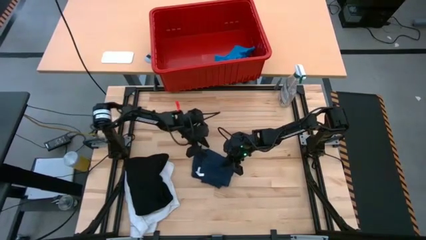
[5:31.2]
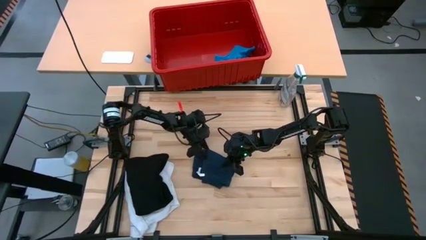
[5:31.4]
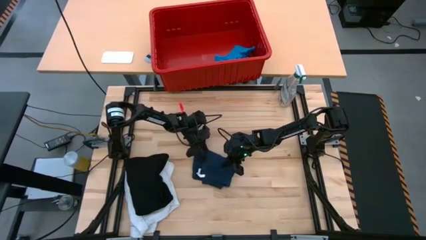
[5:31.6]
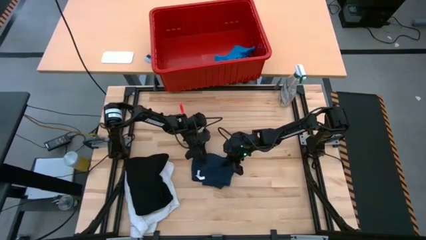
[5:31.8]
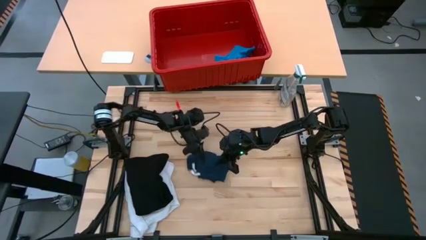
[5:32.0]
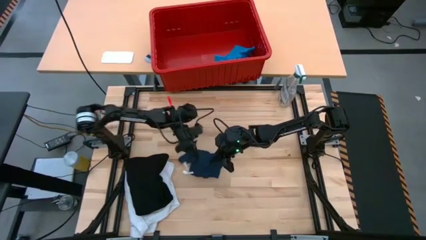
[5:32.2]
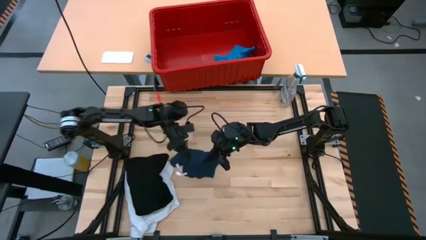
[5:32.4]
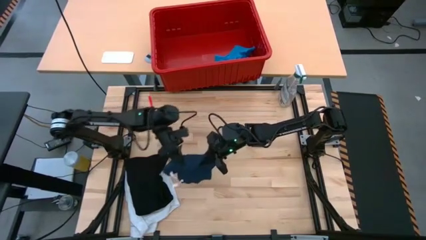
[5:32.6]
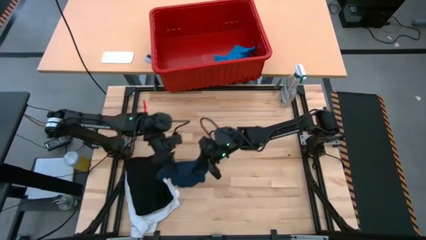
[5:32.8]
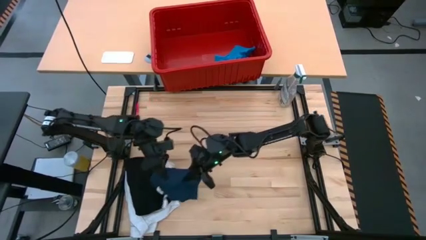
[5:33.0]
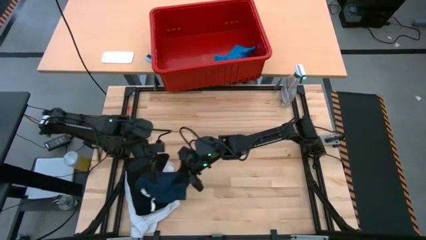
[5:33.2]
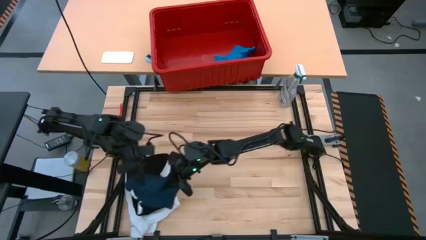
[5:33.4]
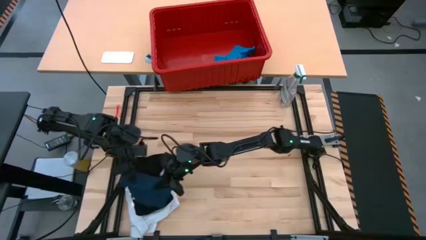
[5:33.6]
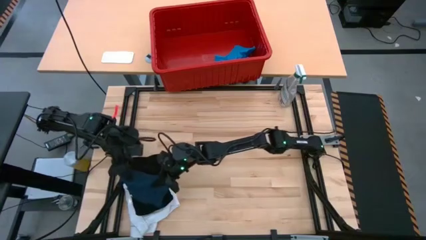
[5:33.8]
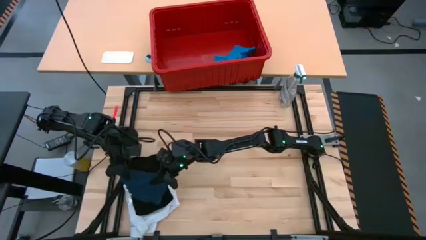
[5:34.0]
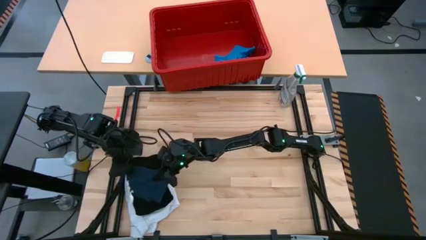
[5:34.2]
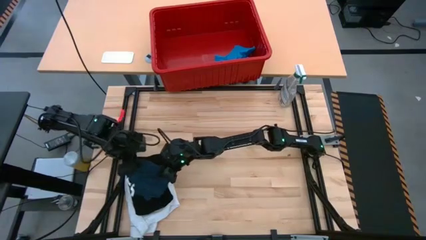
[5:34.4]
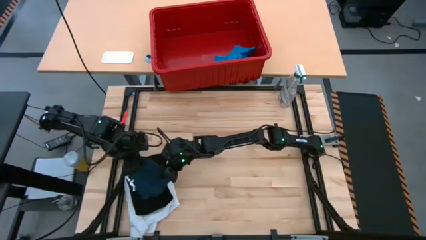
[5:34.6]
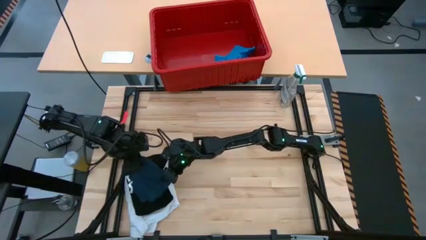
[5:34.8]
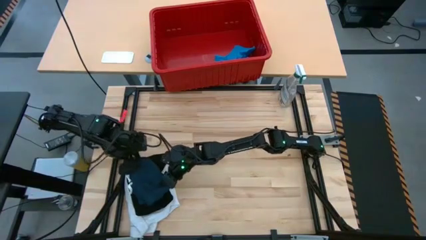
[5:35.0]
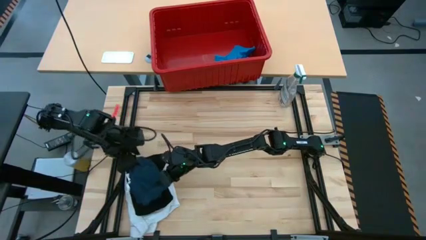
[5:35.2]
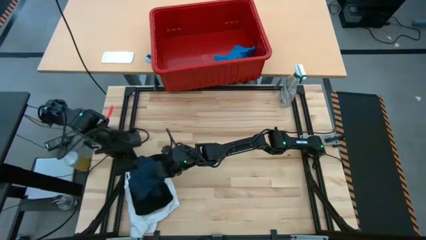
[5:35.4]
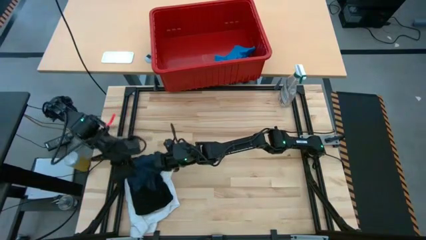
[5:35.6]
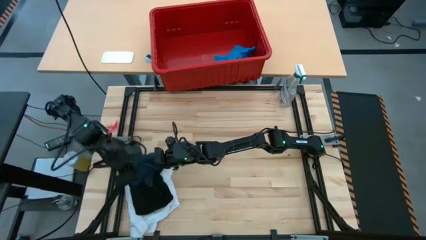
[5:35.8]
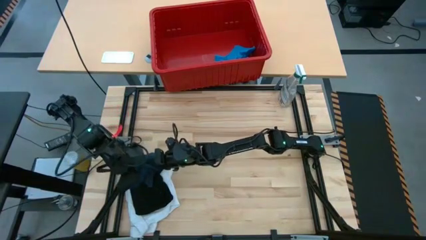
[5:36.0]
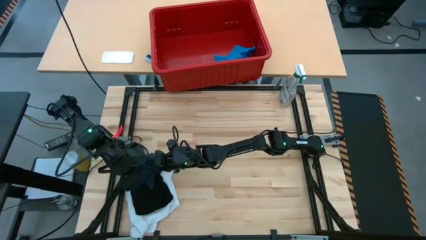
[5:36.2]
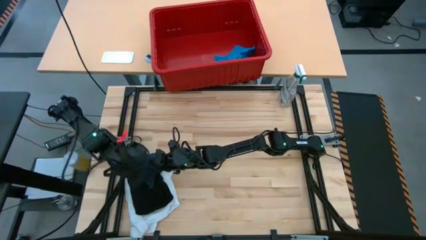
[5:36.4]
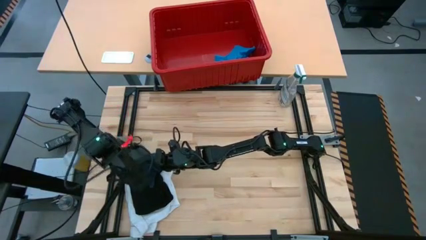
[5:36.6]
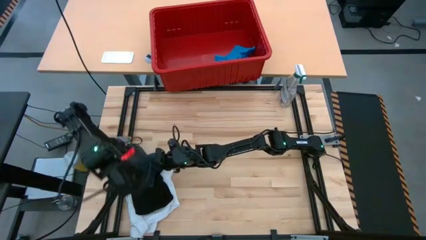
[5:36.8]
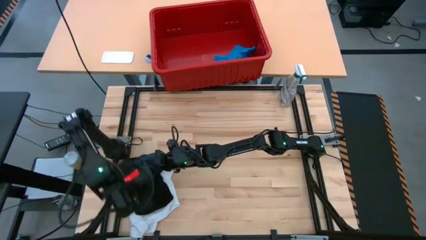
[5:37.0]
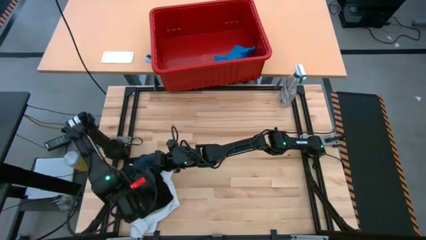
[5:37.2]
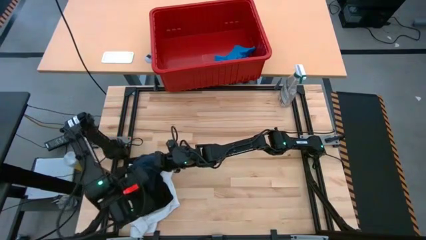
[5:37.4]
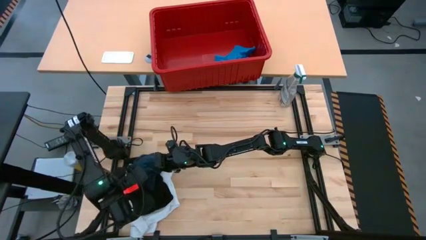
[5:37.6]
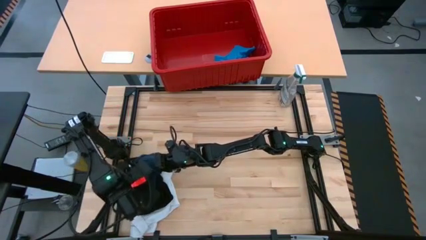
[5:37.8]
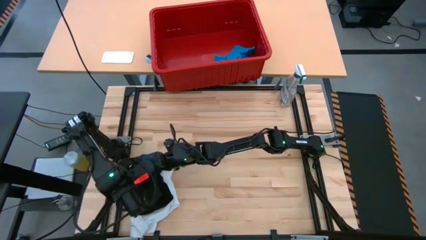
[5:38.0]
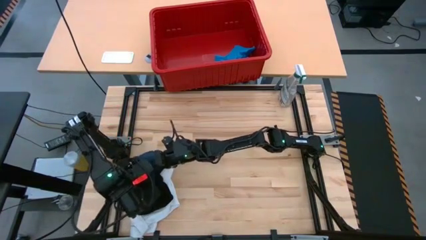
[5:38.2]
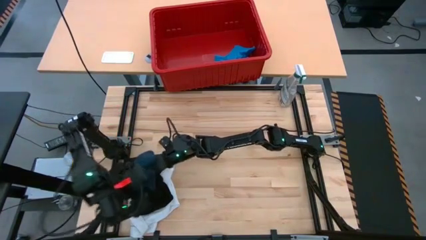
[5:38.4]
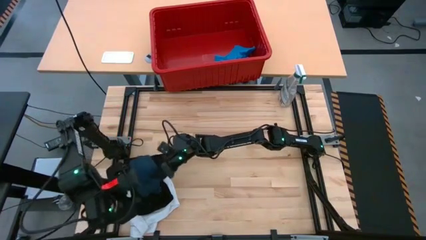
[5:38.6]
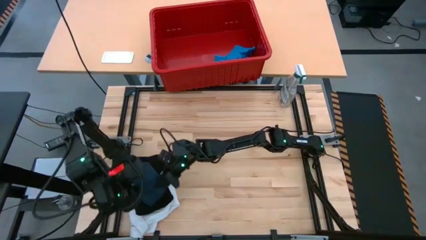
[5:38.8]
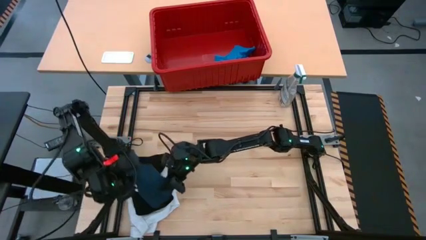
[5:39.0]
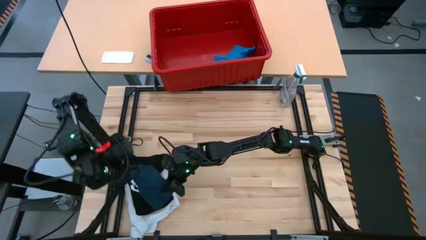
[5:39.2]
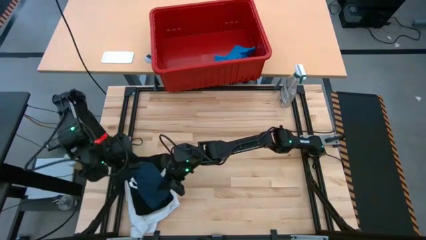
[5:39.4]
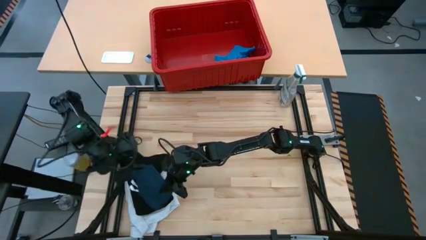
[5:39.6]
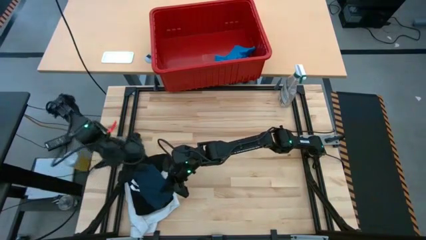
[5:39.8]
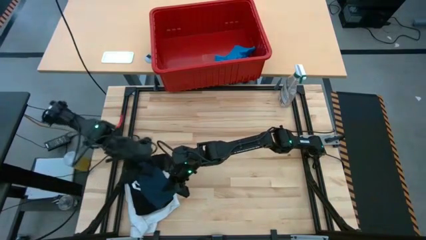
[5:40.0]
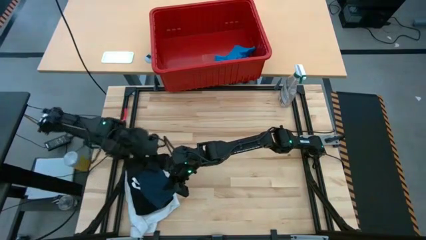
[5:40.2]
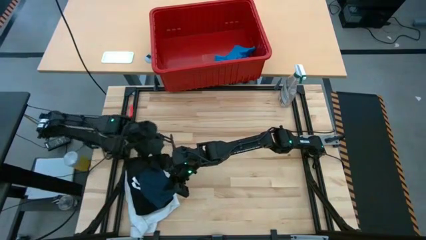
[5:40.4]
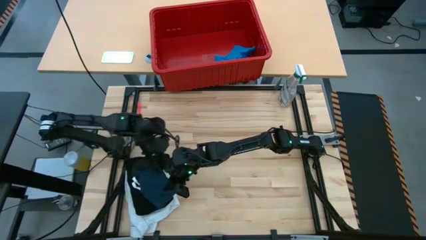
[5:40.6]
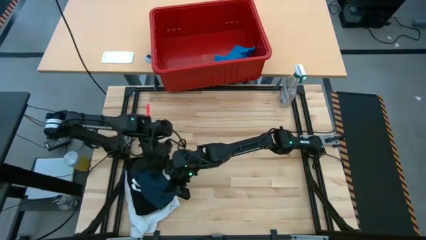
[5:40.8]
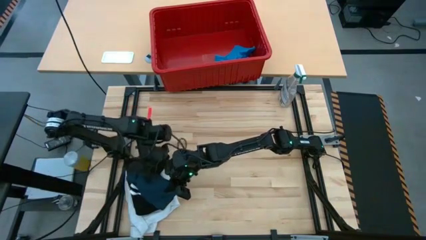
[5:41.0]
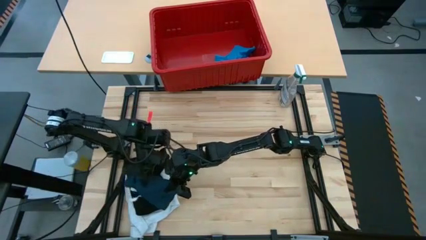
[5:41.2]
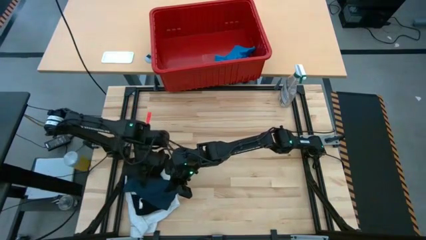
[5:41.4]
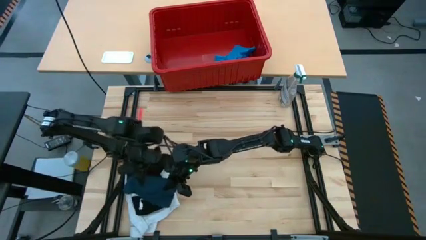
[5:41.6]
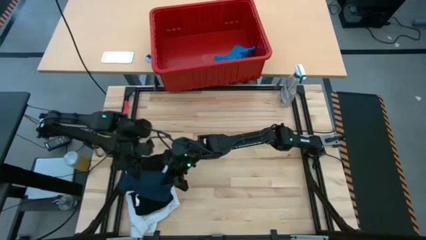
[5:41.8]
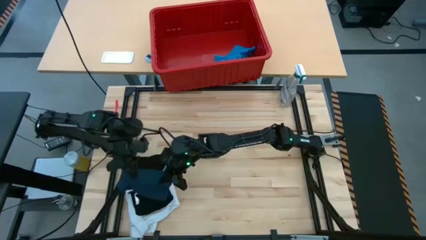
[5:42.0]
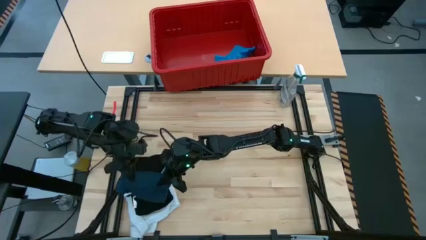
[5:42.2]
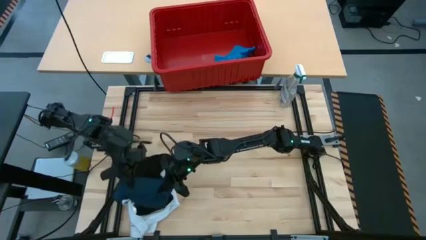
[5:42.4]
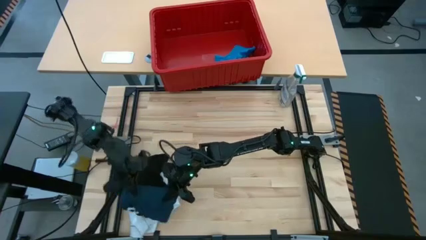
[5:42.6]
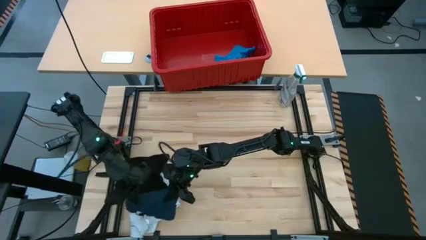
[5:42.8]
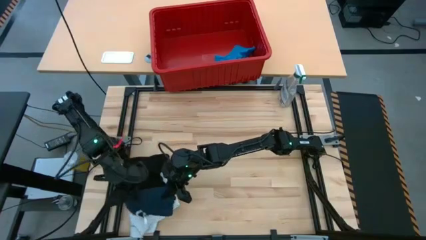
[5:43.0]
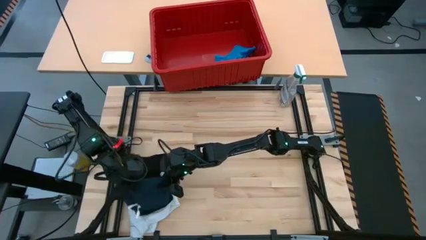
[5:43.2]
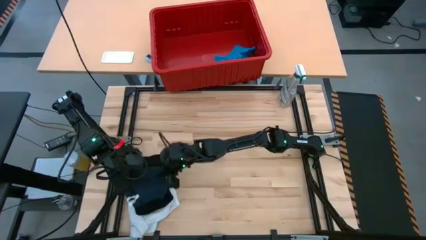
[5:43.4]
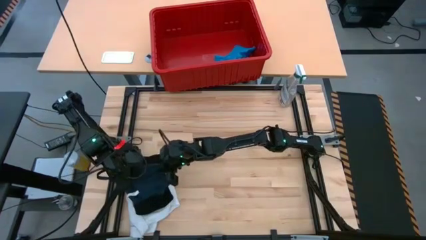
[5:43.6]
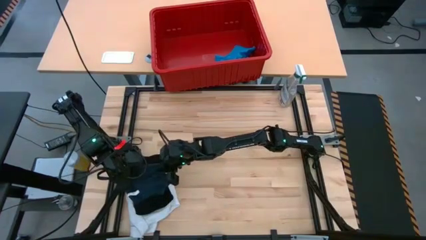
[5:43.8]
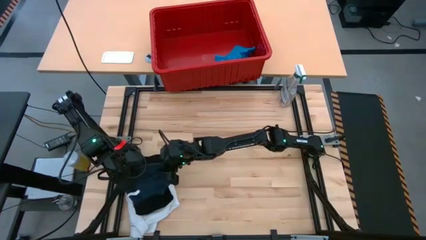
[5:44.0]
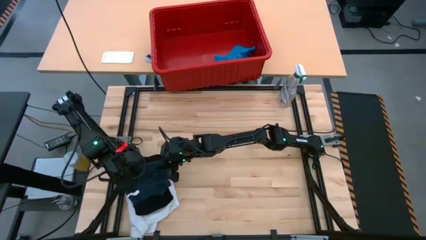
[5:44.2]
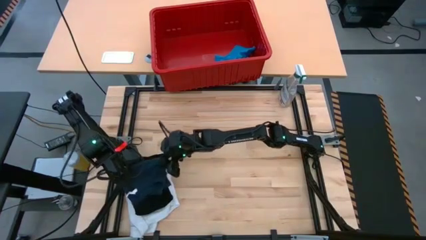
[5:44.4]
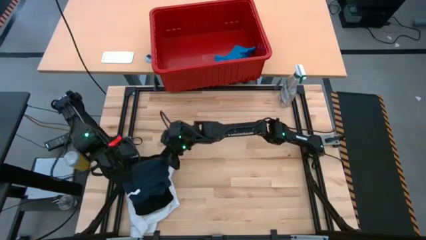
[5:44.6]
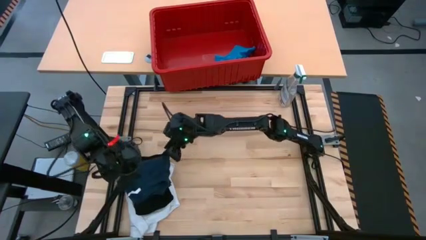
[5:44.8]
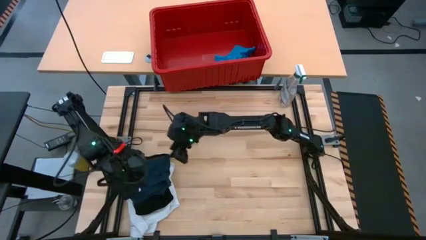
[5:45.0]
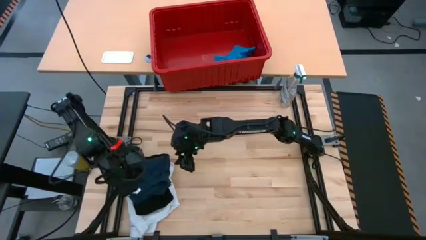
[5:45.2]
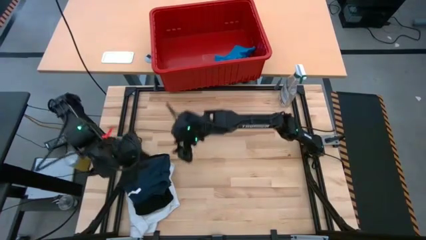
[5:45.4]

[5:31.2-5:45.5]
Task: Fold Laundry from Bin
Stack the folded dark blue shorts on top of the folded black shirt

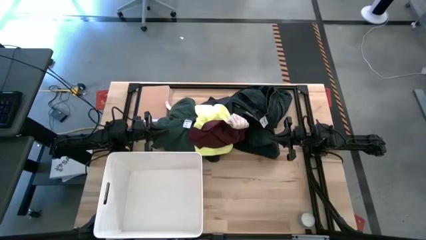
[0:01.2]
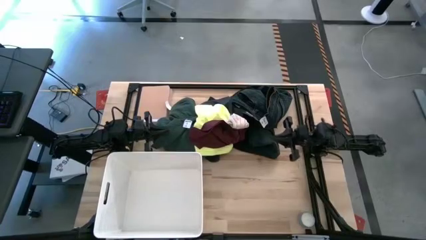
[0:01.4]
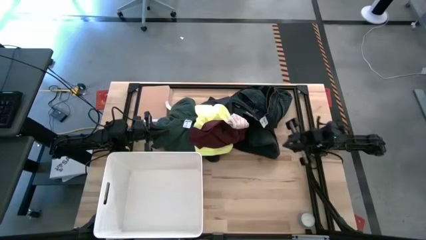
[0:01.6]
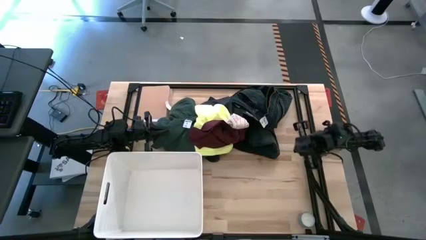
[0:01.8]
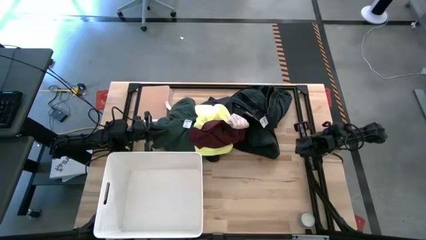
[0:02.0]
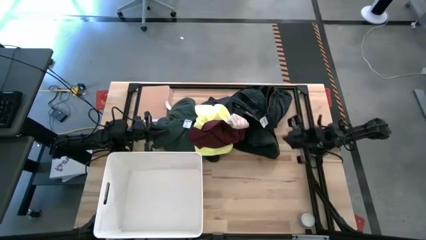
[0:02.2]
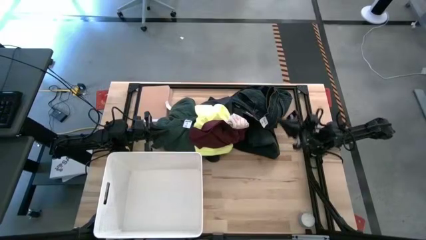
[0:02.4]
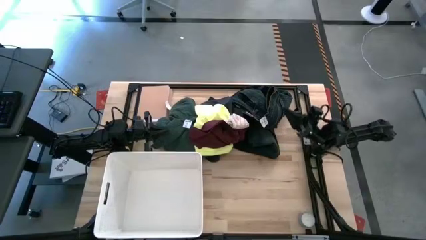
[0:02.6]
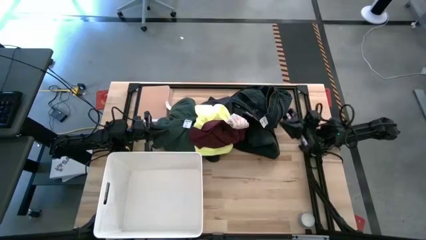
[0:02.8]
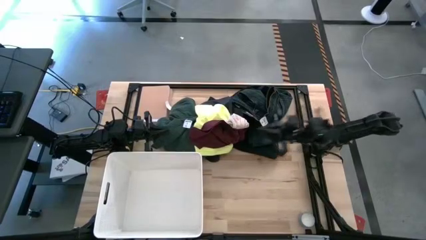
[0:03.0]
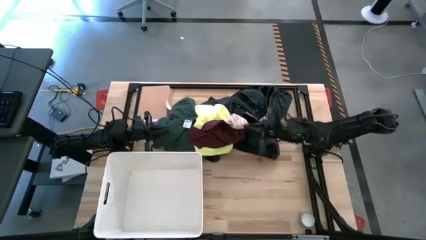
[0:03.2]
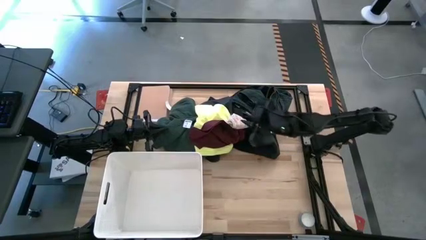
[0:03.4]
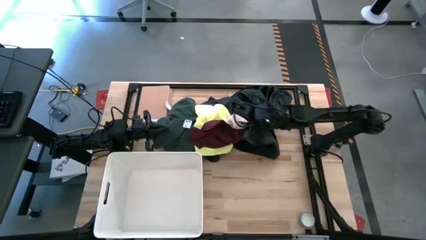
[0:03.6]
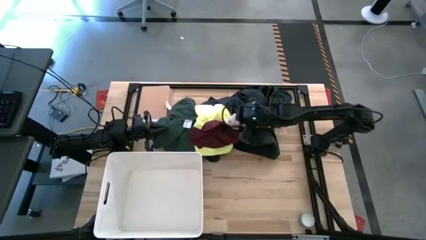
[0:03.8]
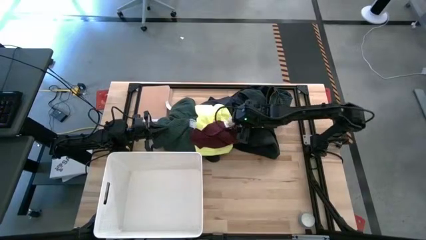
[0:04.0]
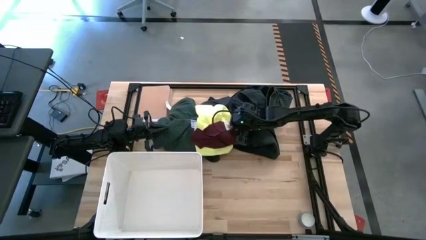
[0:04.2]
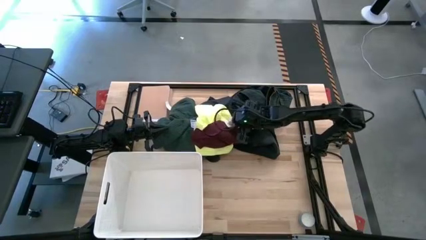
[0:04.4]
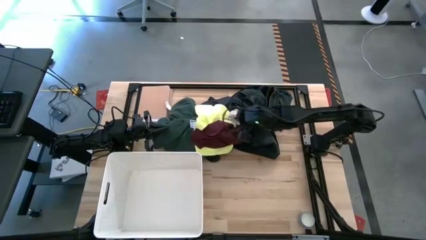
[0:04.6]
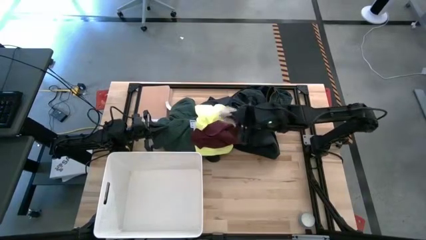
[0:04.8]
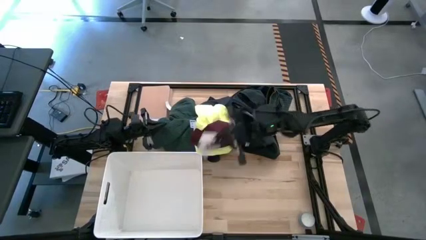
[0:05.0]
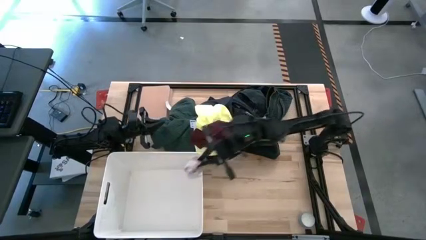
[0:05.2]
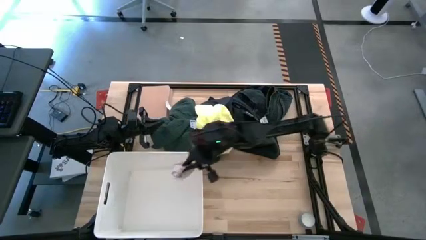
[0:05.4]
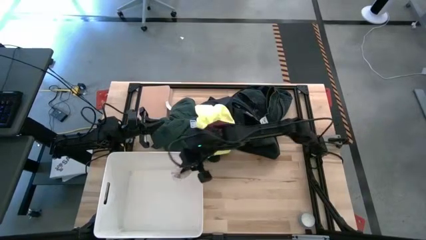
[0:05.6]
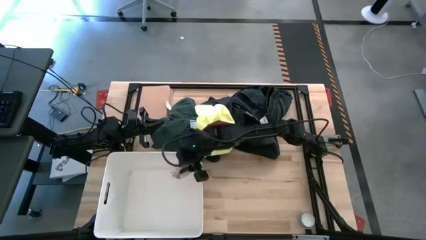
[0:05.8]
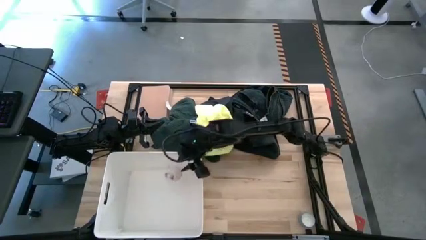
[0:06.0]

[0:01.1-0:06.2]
Task: Sort clothes
Put the pink striped sock into the white bin
